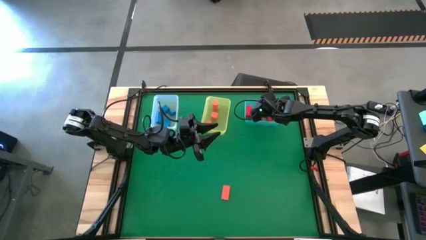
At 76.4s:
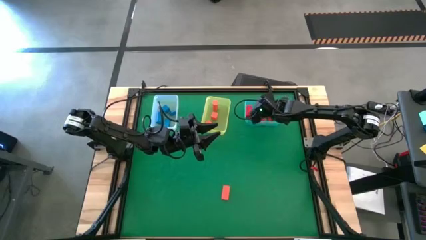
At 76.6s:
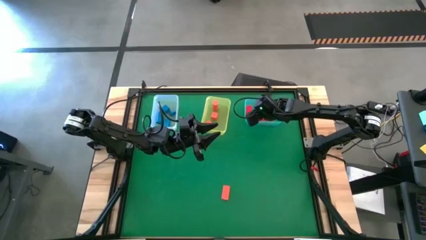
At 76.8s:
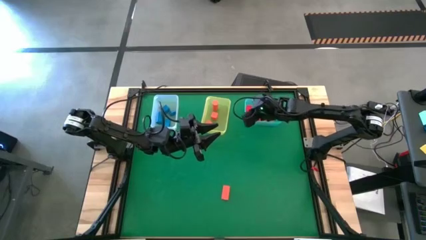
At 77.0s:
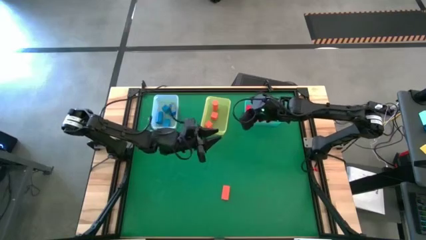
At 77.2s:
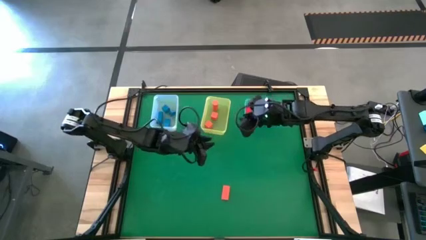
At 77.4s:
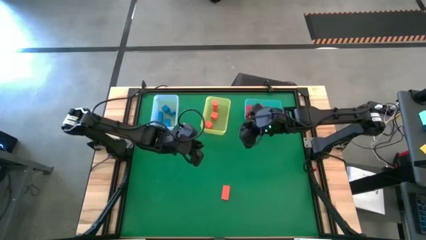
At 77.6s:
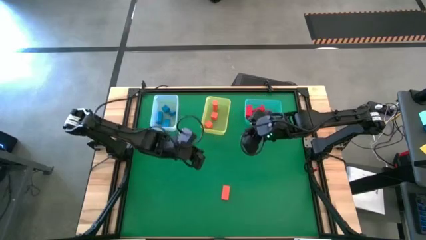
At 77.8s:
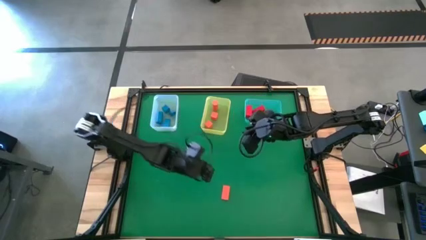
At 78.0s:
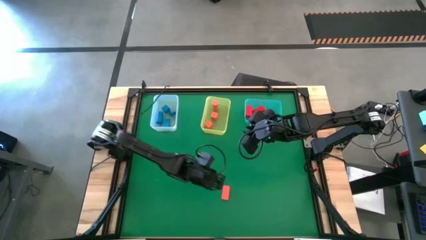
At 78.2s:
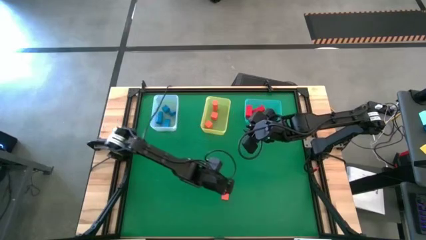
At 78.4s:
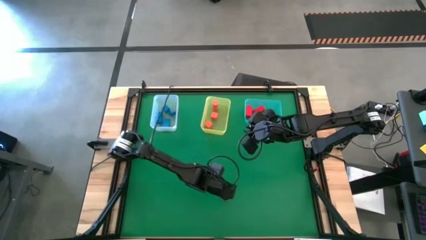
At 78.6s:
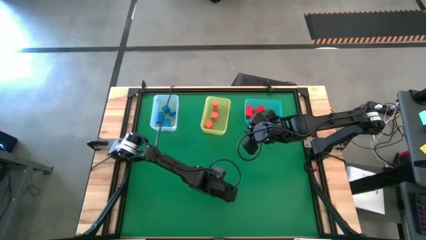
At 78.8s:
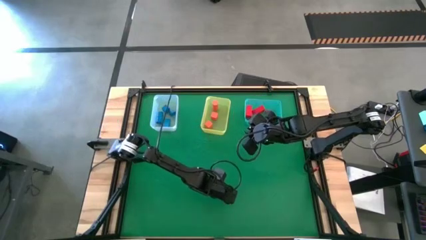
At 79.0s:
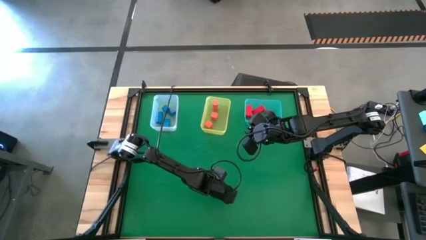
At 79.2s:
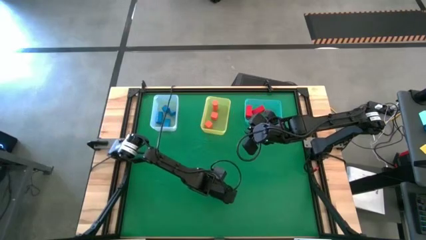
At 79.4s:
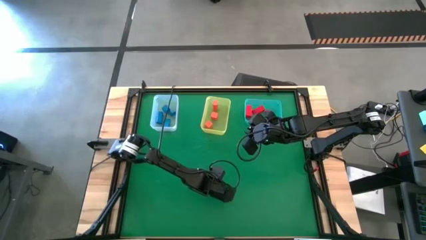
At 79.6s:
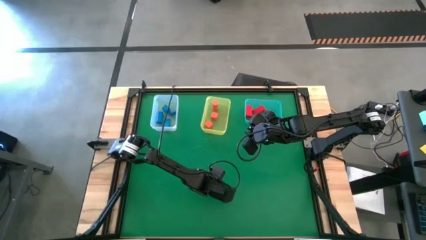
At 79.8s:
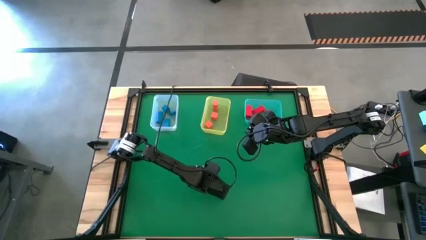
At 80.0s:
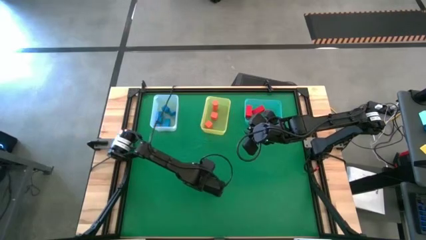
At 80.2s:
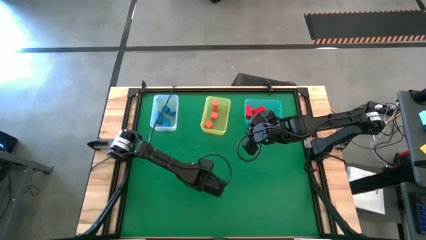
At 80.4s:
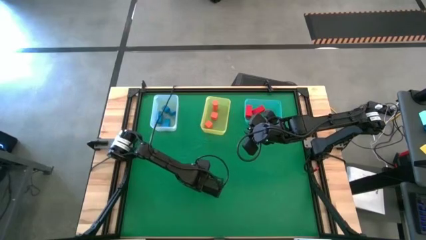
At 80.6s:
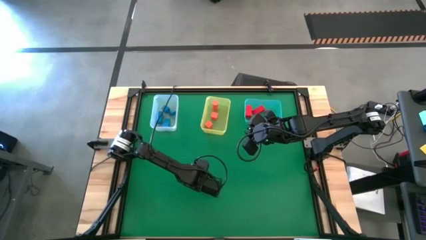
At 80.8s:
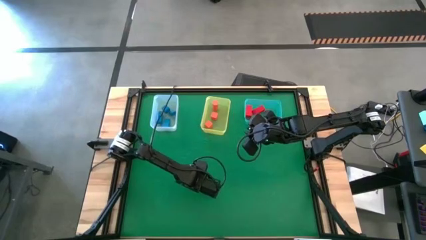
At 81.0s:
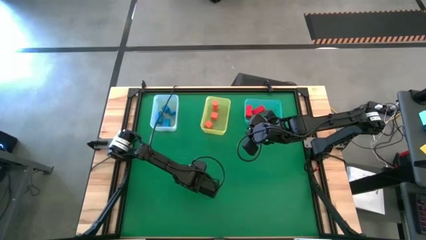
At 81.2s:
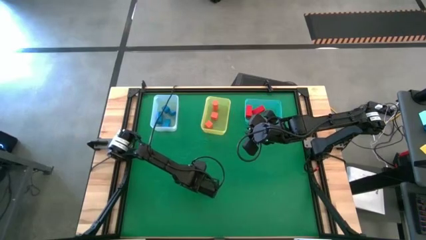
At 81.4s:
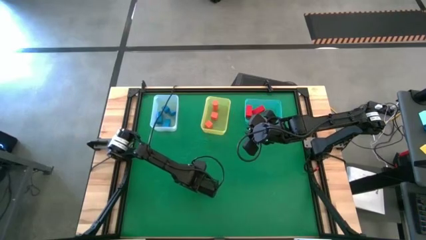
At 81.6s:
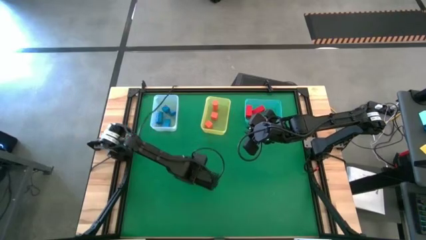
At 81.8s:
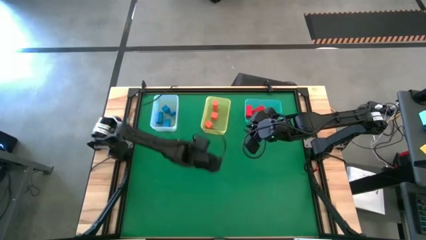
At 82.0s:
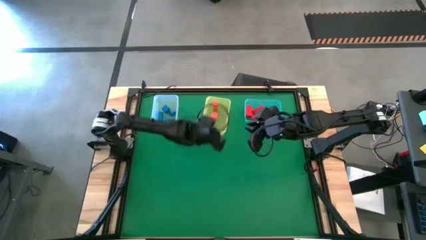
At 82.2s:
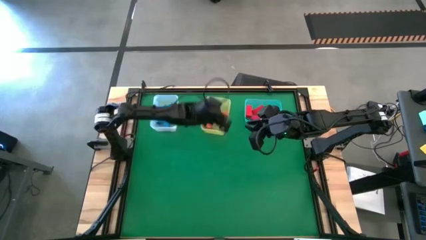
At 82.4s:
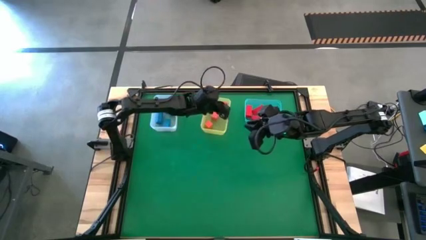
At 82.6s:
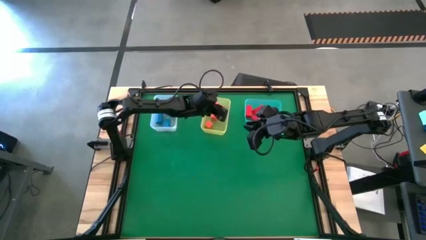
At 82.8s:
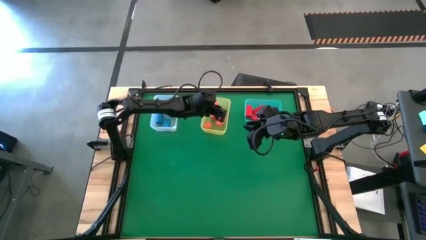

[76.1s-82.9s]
Task: Sort & place blocks by color
Put the orange block into the yellow bin

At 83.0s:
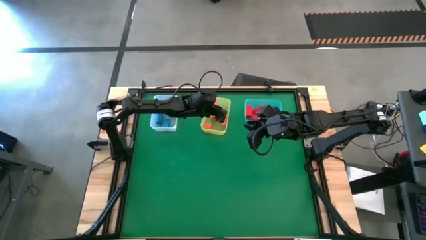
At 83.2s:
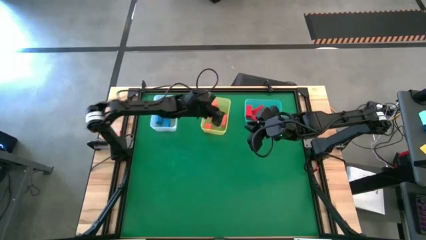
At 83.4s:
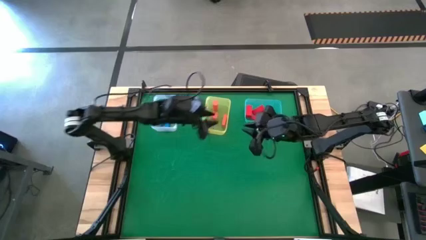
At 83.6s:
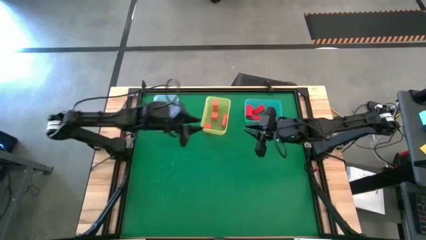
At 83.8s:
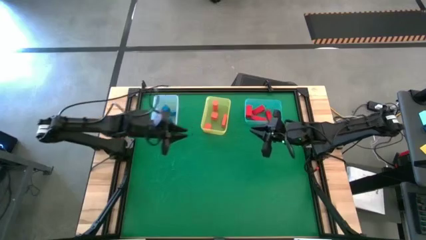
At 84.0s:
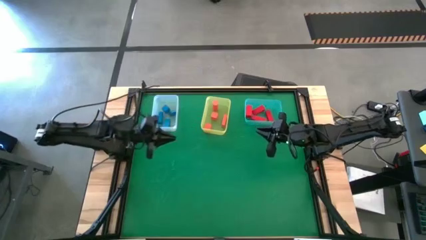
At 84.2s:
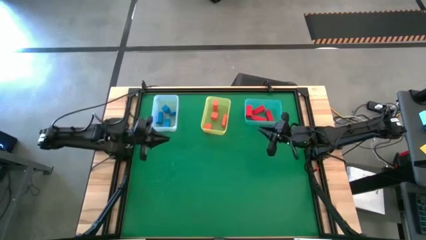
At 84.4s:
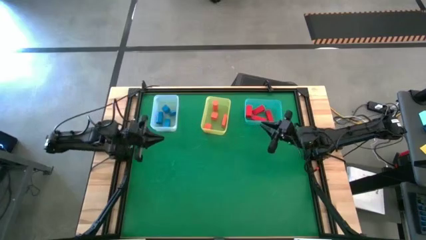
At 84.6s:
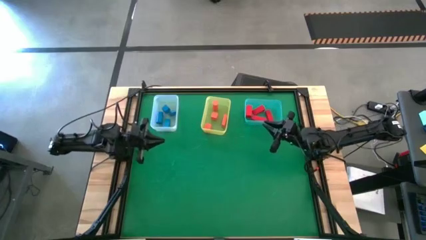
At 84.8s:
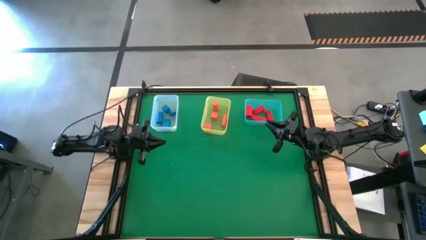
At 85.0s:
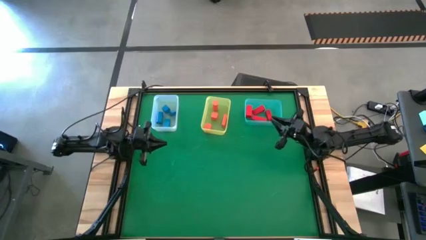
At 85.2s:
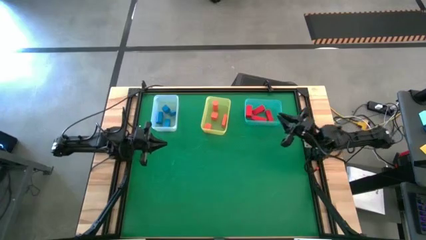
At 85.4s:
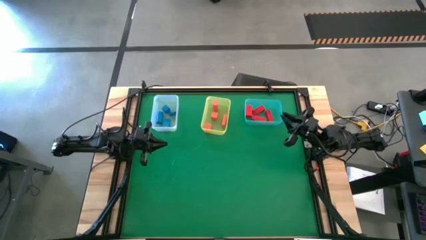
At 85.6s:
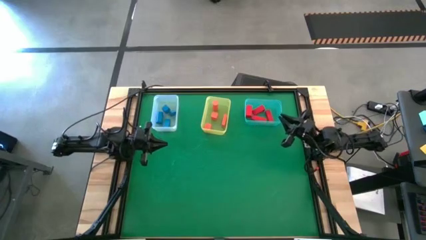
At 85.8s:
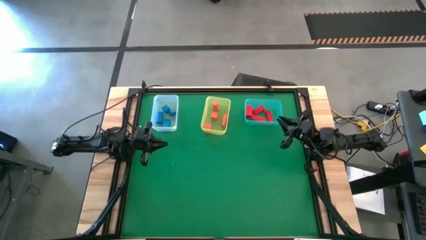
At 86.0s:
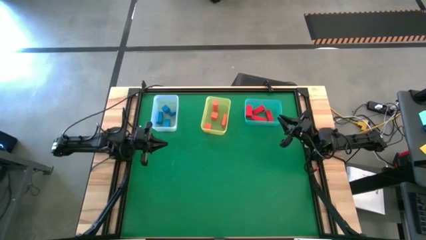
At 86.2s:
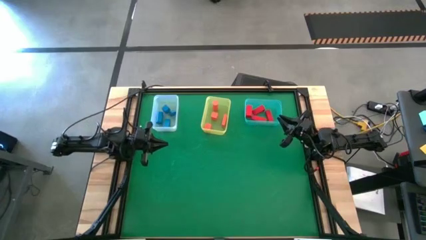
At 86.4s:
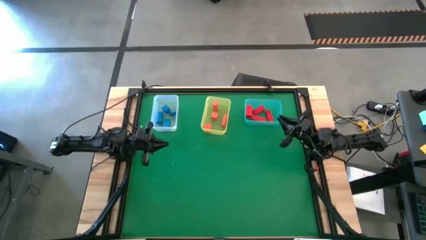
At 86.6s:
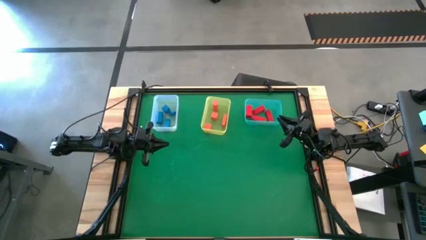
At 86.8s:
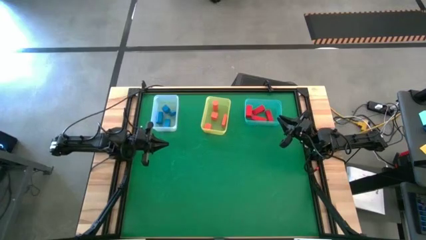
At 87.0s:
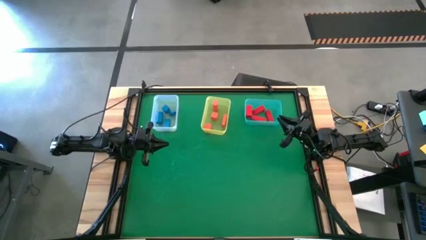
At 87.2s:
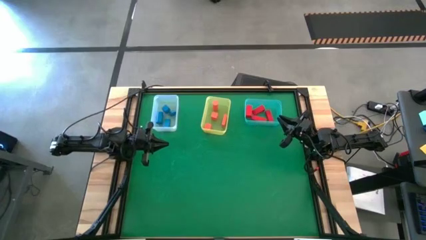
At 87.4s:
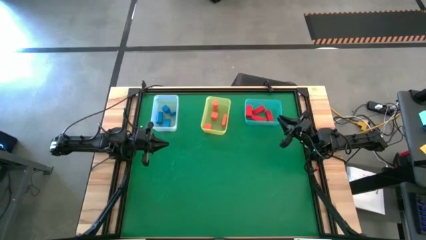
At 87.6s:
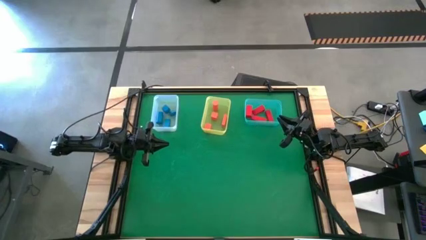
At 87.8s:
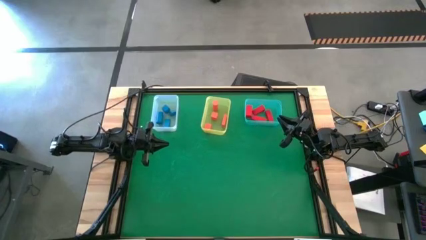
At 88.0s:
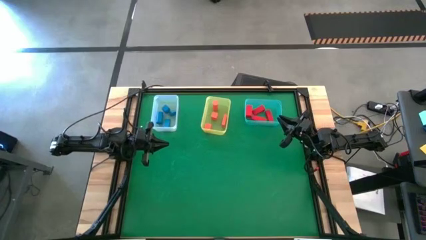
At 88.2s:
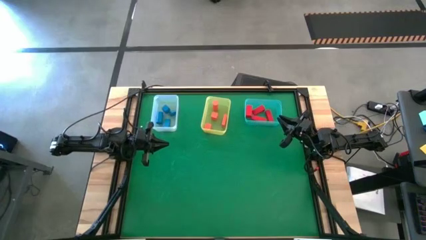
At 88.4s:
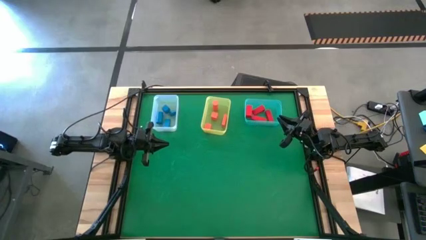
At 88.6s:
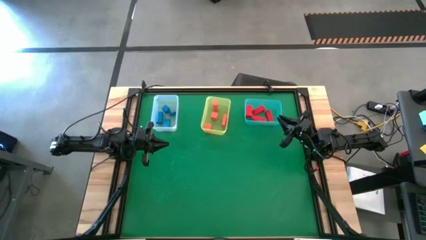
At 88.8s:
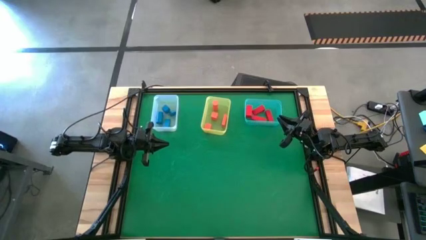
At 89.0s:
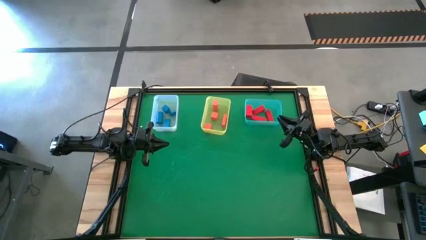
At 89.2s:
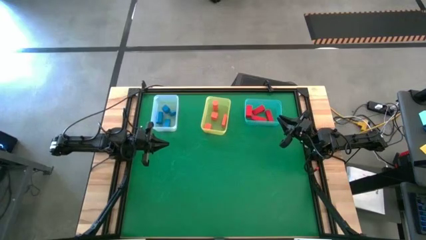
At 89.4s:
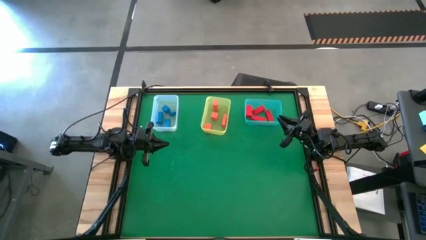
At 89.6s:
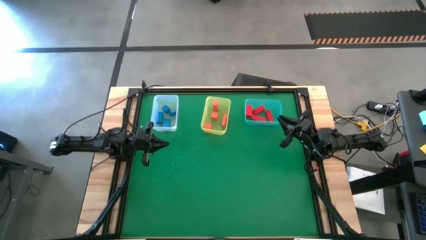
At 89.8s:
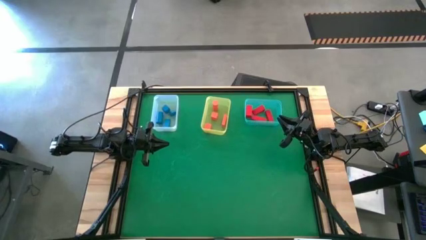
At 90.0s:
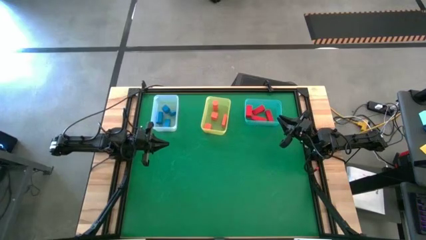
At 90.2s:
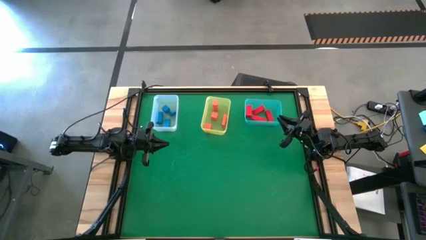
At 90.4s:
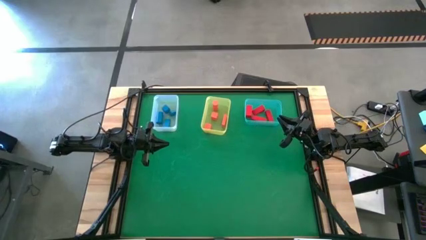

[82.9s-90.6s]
Return to Home Position

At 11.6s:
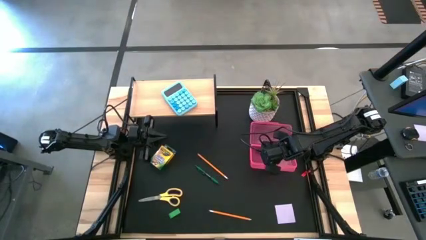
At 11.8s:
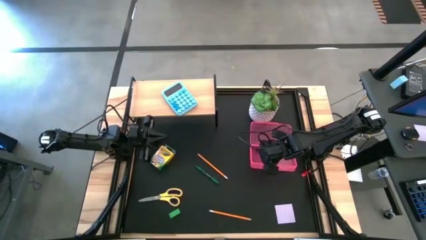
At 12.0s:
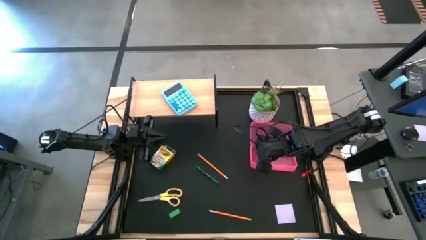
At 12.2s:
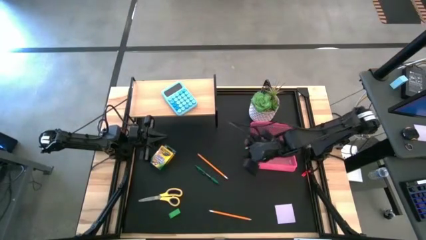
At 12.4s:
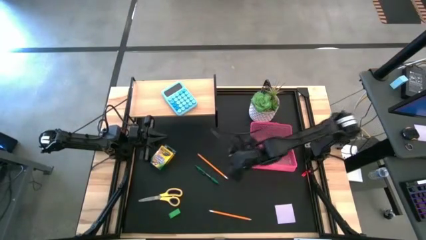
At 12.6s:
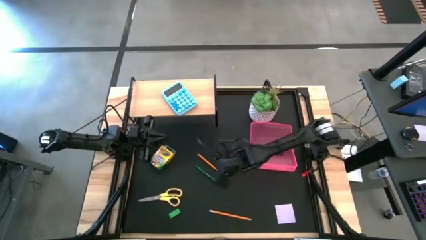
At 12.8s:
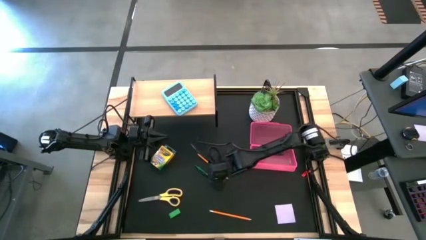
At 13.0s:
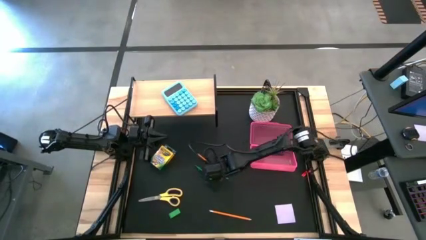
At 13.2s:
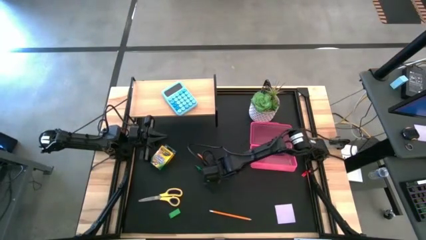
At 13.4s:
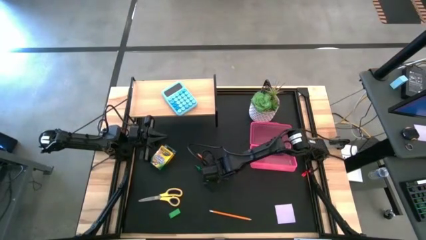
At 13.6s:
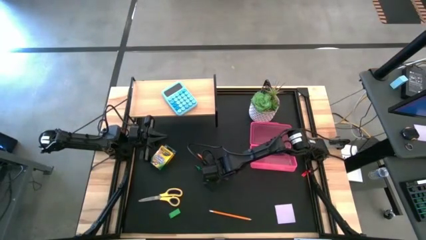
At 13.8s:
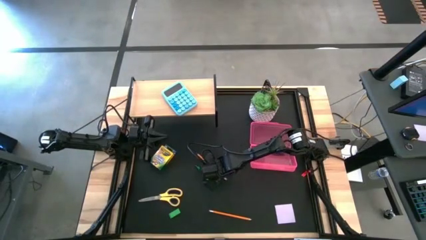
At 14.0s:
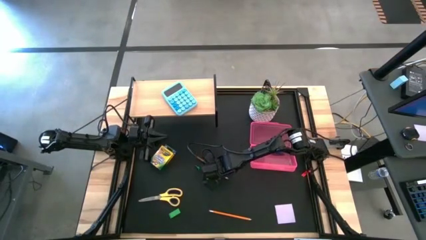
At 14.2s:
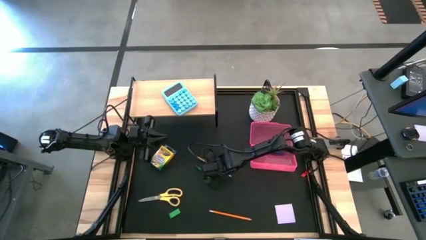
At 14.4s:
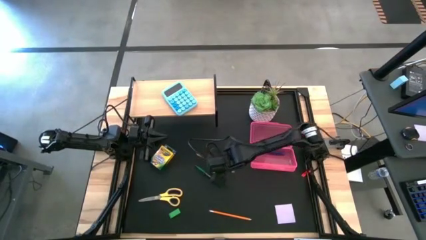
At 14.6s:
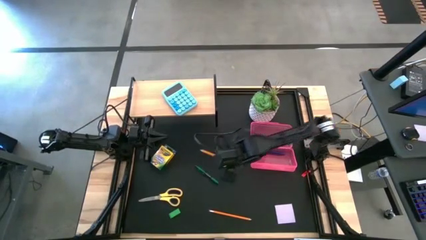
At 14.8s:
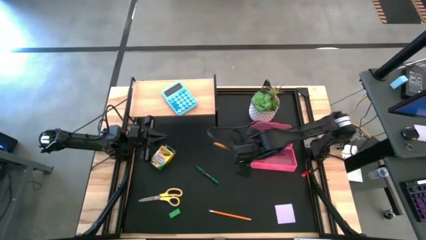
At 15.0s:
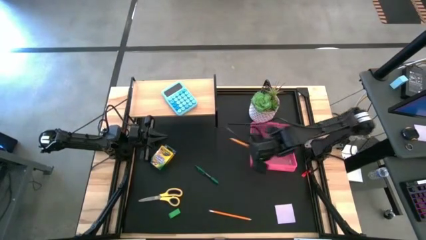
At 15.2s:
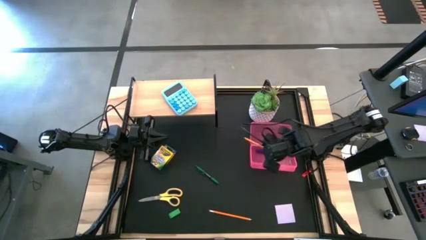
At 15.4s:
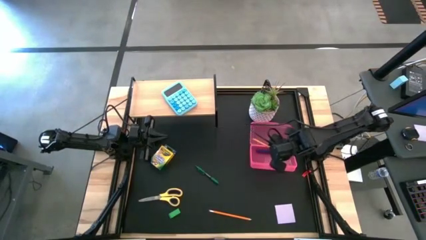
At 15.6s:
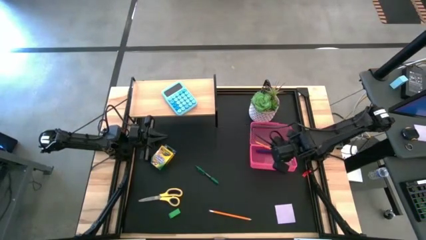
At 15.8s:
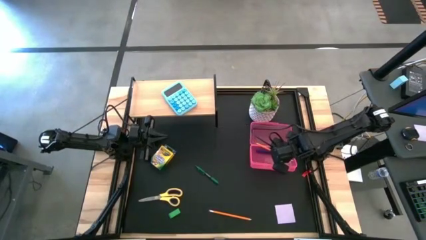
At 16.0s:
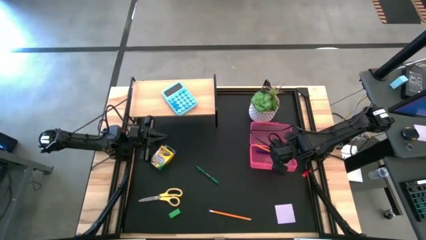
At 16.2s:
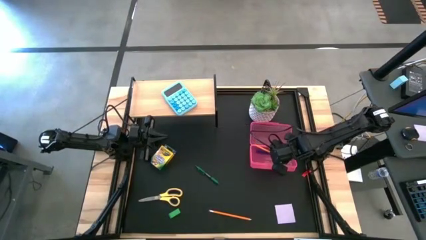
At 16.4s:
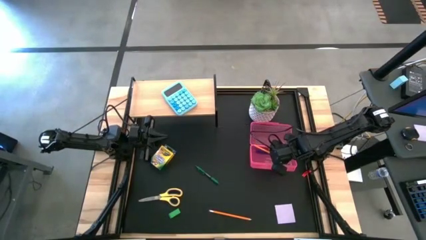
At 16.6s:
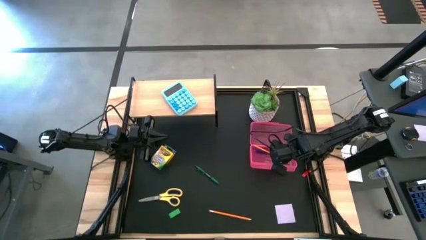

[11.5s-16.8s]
Task: Pack school essentials
Put the top orange pencil into the pink supply box
